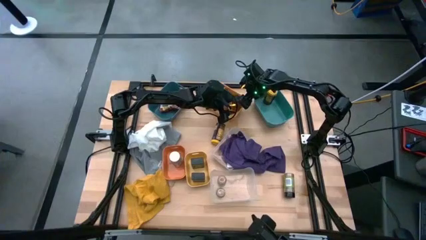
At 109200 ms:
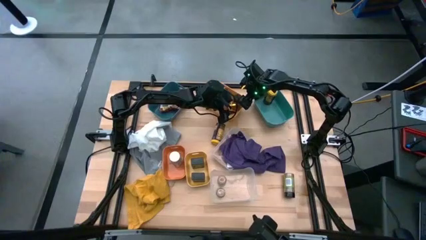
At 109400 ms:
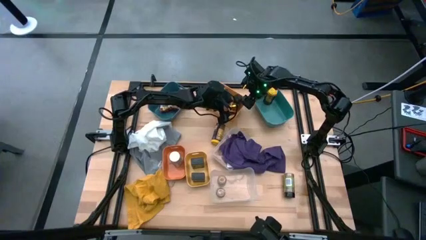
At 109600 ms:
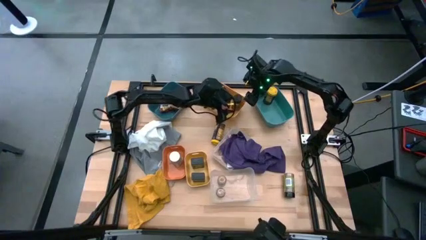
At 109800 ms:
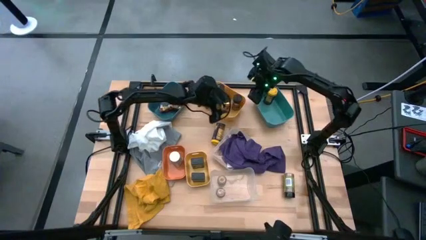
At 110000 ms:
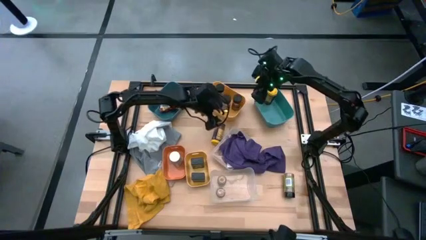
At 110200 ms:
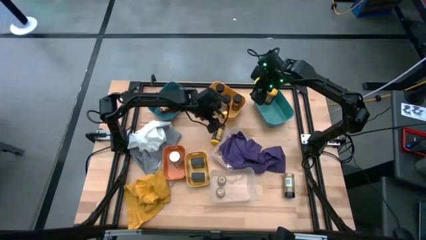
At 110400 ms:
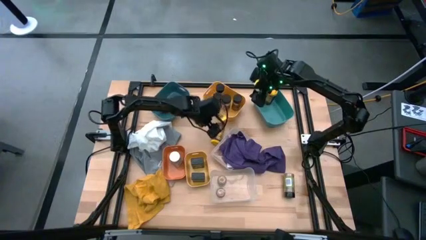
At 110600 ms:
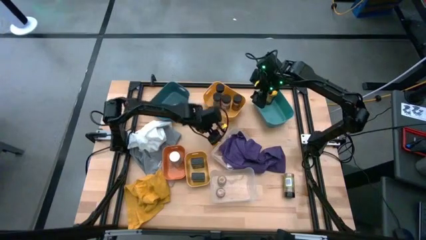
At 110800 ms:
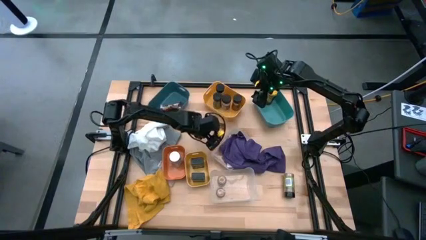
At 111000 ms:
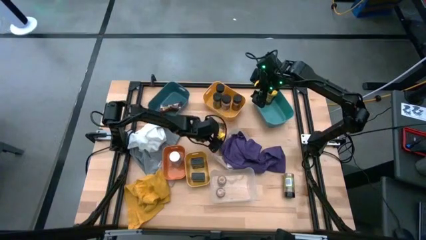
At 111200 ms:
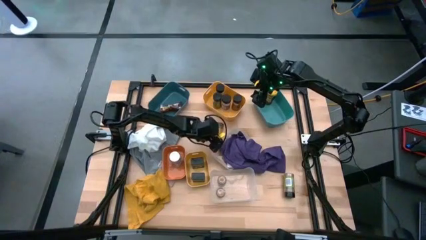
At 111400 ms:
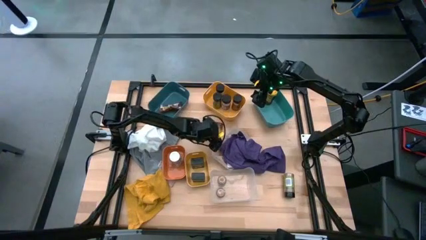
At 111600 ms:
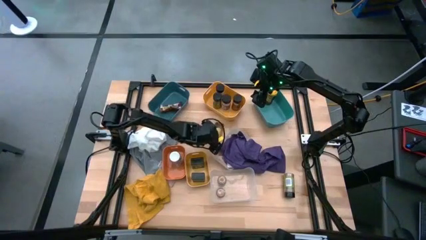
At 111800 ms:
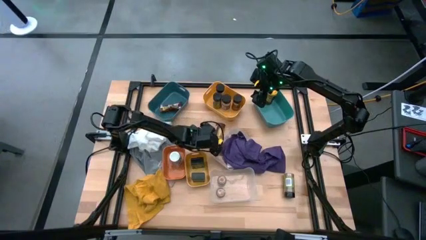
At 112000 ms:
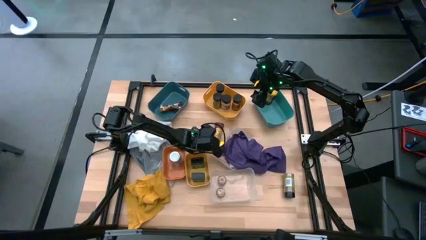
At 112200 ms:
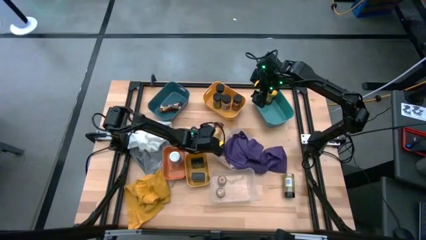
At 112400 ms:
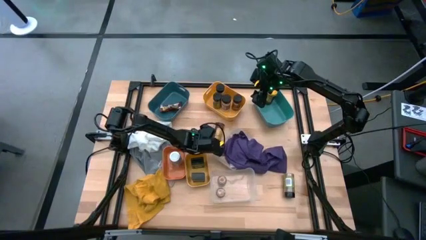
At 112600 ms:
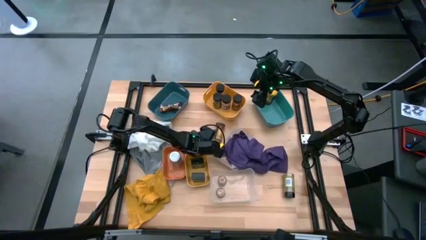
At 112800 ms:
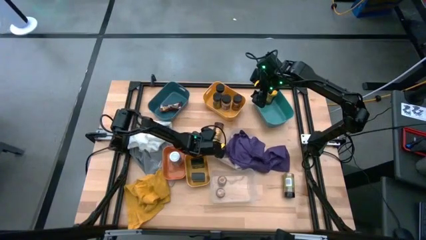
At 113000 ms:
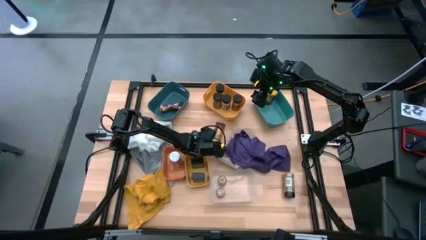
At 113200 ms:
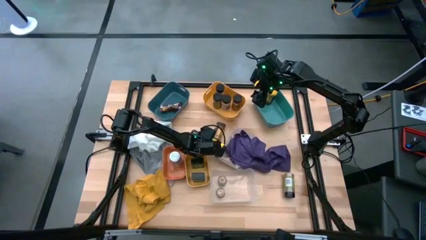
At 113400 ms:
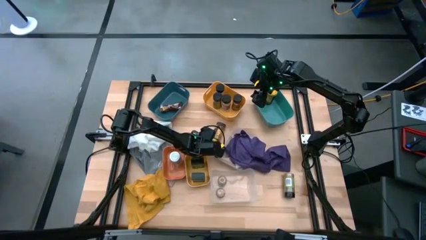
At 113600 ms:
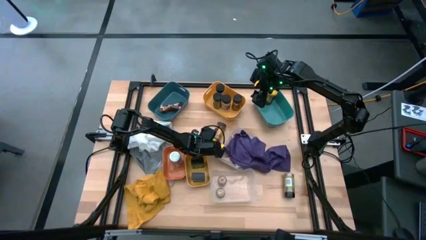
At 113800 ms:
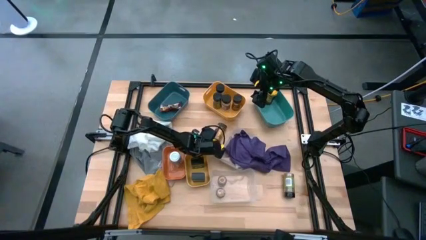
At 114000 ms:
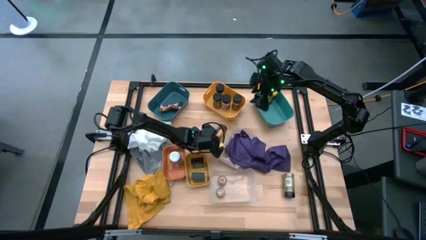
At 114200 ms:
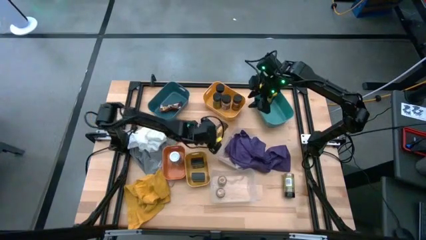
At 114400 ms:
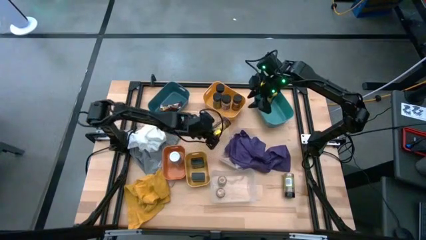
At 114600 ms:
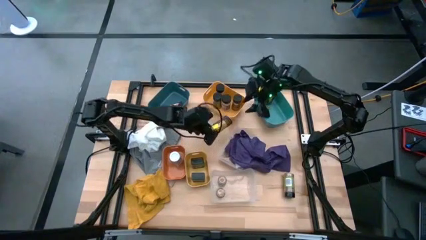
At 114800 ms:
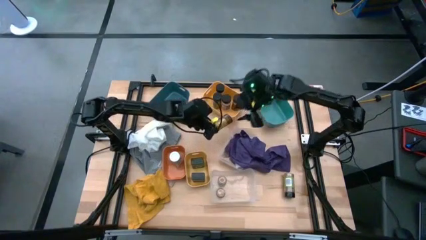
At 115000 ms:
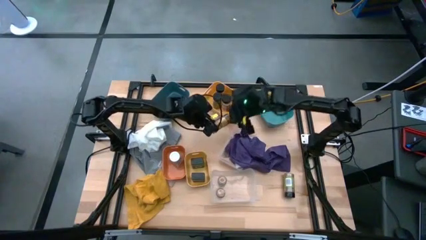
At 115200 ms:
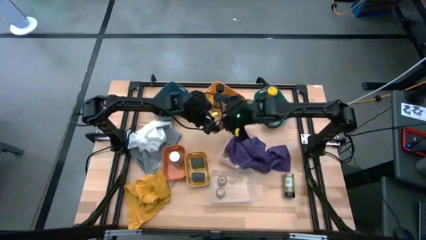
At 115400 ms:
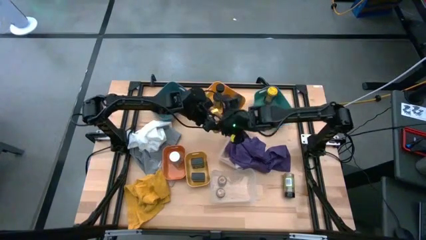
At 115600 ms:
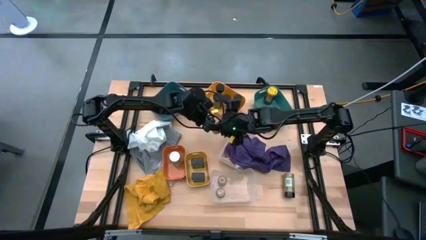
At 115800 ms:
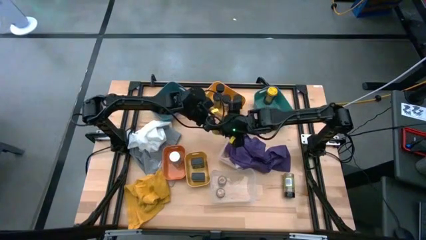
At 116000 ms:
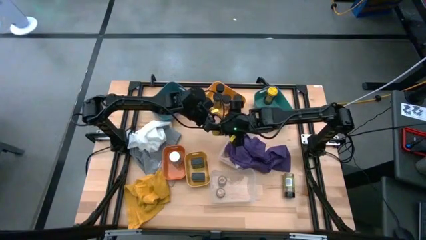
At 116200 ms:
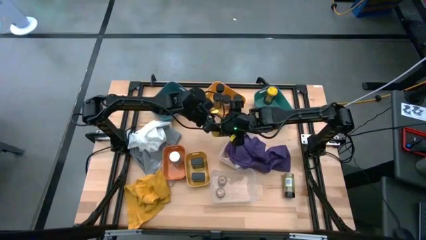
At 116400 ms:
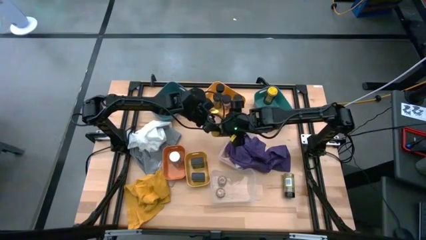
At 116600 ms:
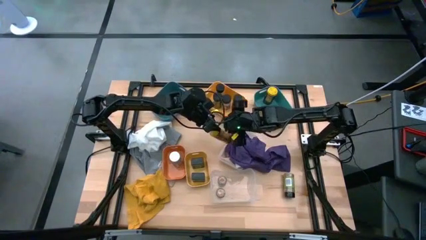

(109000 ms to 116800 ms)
Task: Sort spices by type
Put the yellow spice bottle into the blue bin

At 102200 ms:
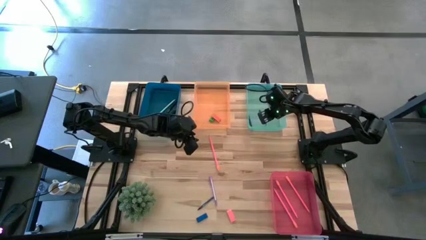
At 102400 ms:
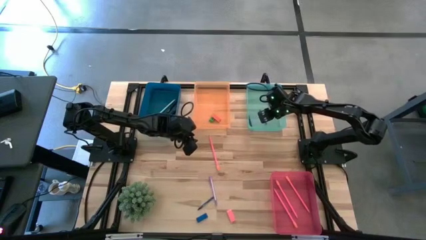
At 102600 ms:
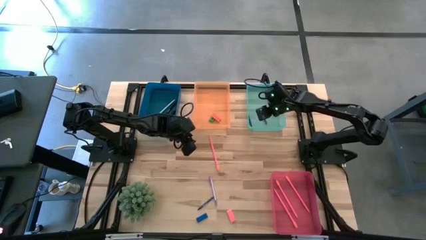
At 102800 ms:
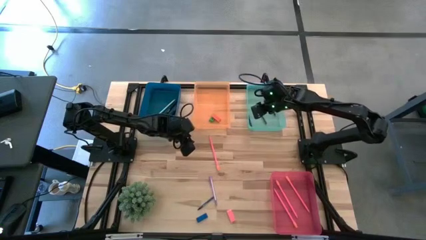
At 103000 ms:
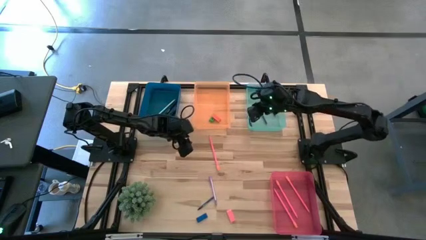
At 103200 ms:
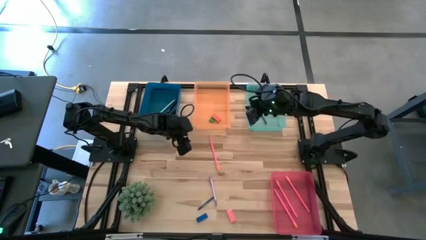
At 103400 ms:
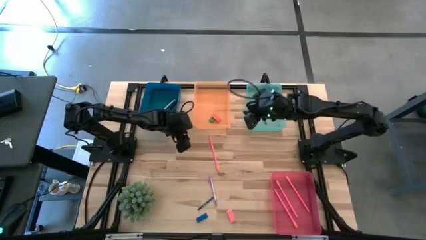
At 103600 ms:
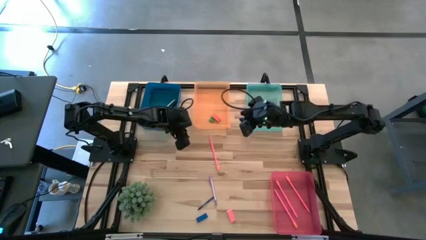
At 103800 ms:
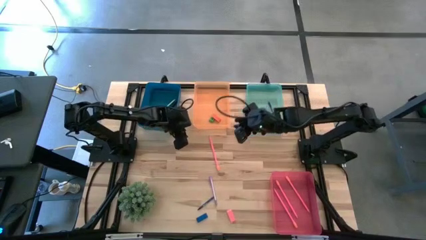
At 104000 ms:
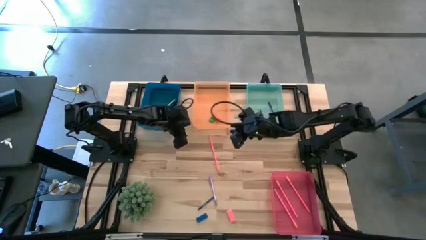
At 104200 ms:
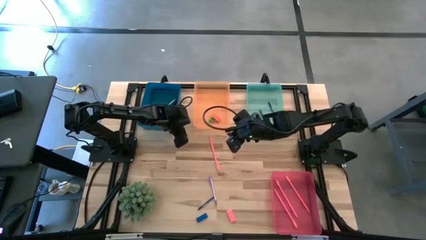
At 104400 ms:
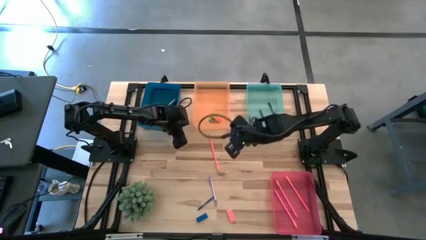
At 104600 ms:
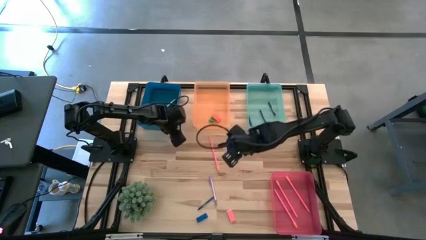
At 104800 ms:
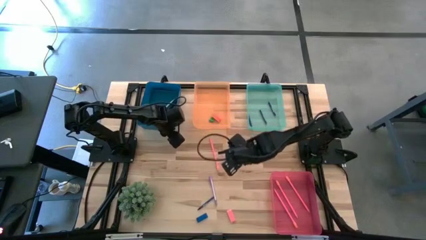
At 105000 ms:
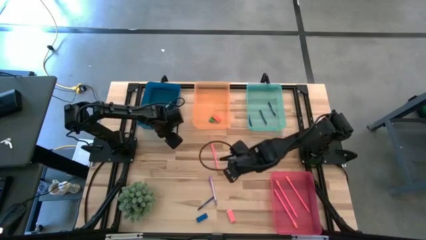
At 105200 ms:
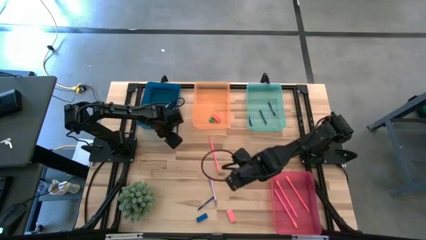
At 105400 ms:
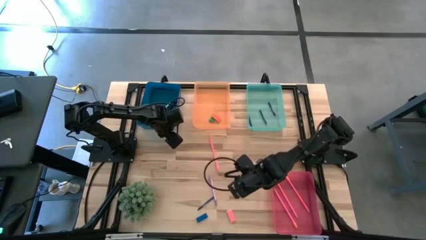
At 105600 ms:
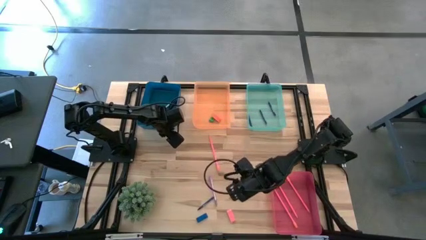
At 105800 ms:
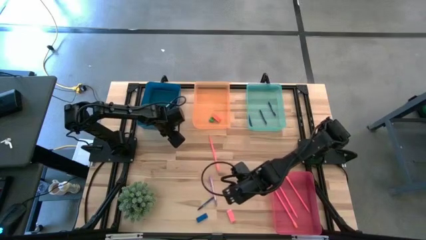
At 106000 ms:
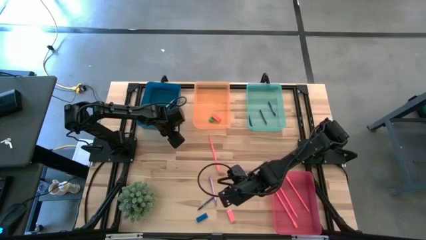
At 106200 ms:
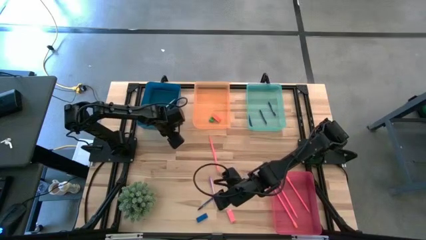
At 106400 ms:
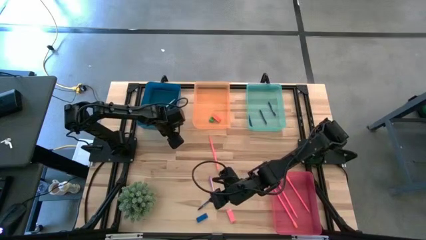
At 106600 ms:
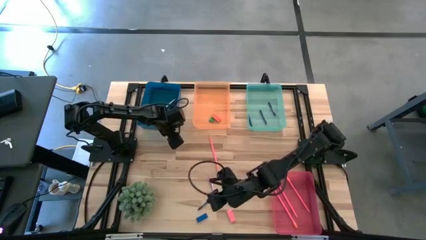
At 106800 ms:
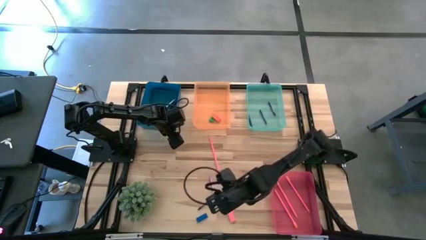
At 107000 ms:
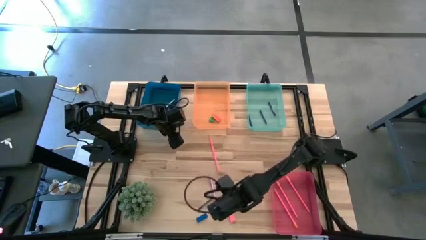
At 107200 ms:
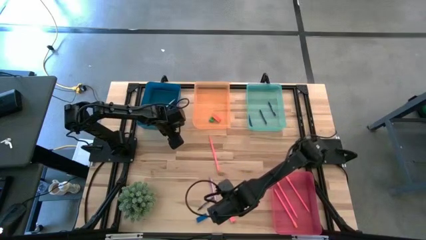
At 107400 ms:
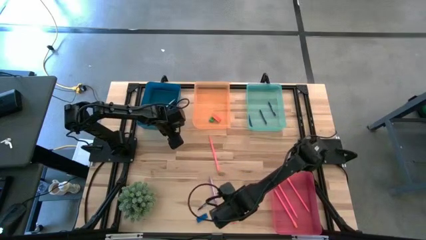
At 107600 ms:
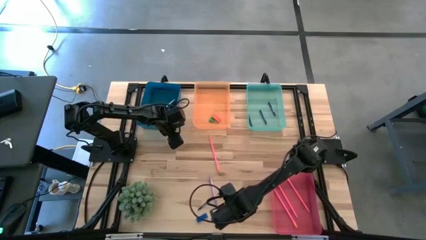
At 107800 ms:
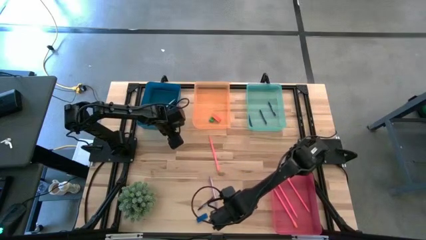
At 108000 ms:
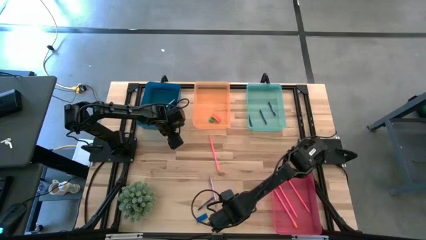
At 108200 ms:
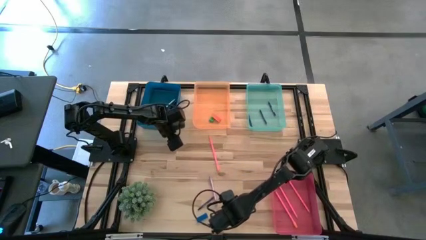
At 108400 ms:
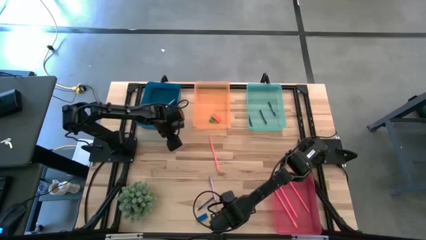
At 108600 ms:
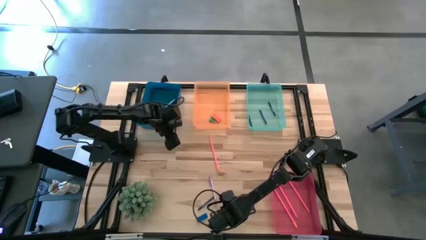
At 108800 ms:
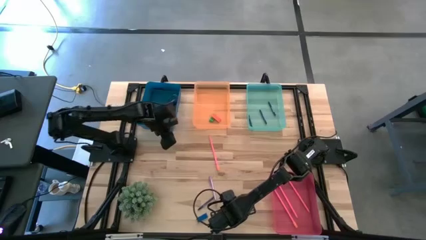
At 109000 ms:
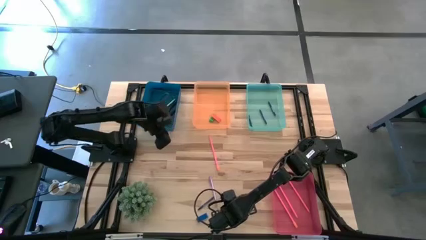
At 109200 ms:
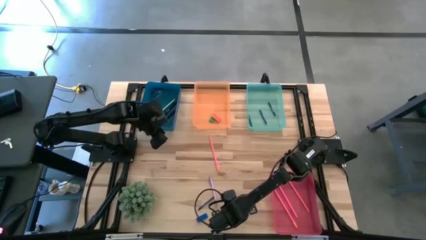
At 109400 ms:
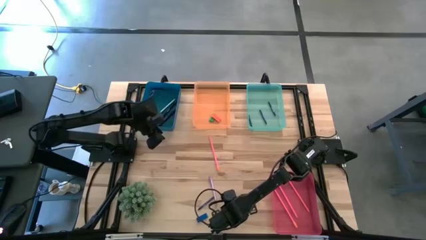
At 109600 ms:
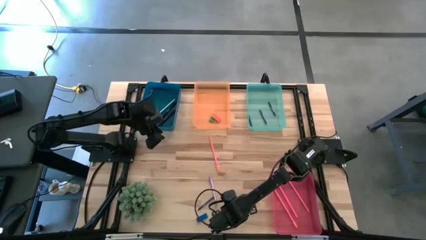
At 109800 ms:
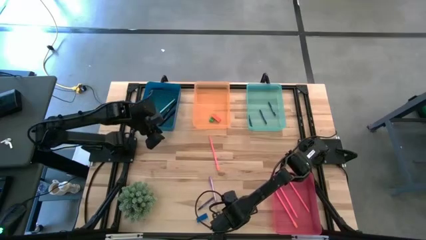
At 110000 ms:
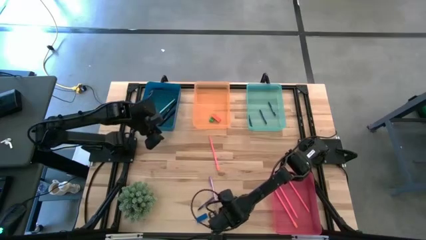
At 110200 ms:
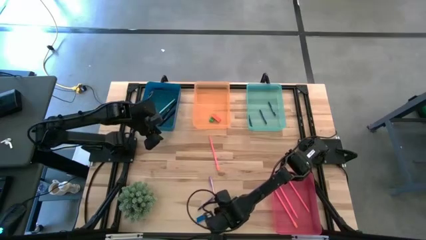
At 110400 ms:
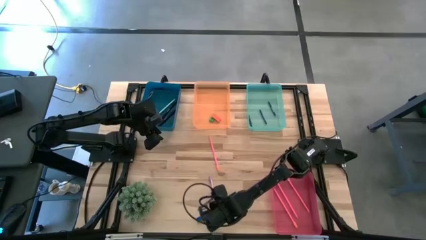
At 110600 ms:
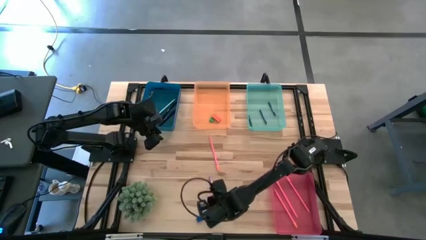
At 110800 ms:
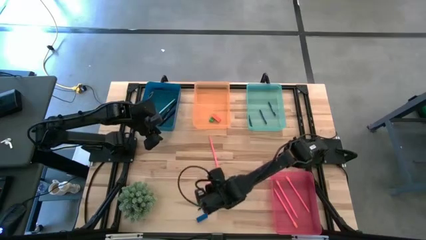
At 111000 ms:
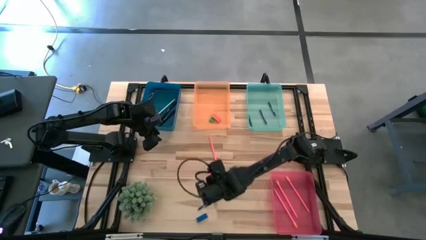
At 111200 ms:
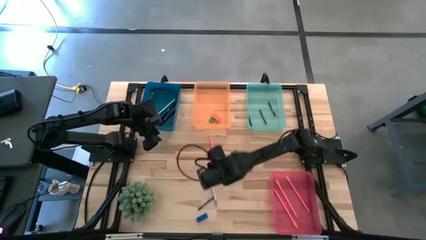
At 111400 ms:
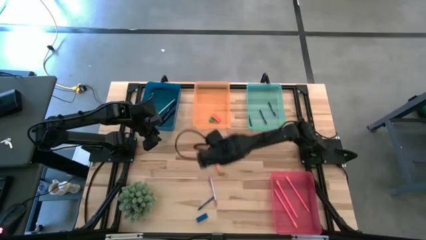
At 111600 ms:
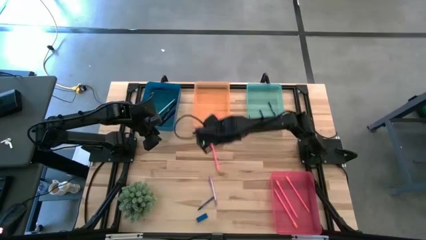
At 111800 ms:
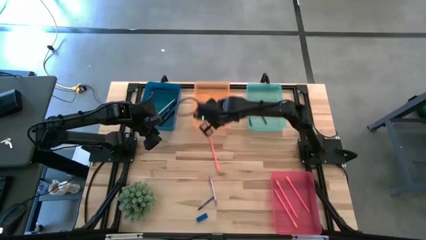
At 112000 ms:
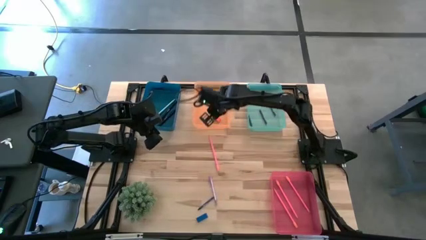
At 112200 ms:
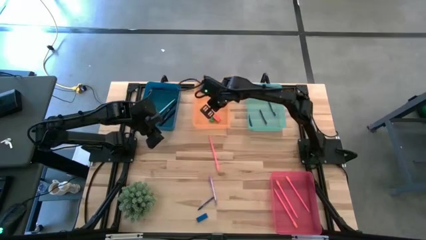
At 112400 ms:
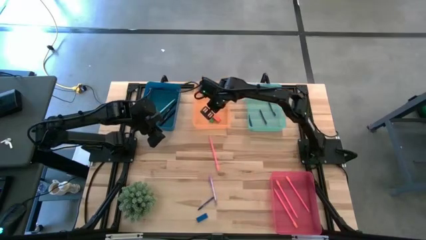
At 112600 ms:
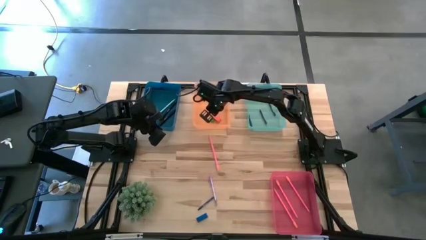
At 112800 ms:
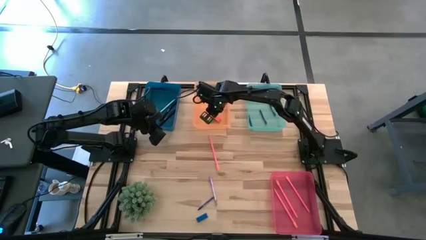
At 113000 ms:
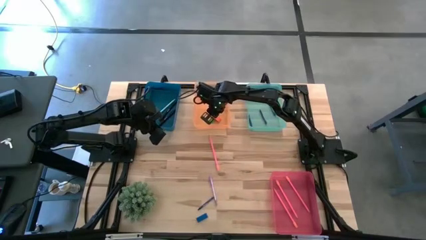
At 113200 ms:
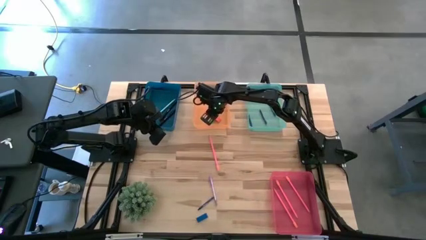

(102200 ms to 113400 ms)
Task: Sort crayons/erasers/pens/pencils in bins
Put the pink eraser into the orange bin
